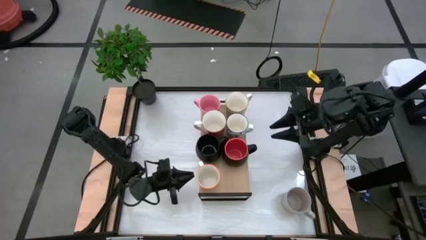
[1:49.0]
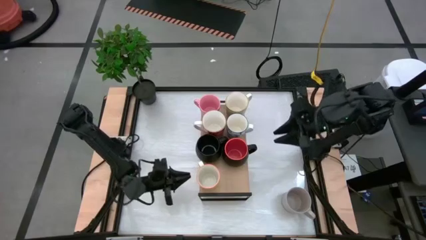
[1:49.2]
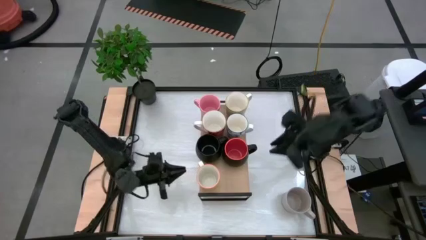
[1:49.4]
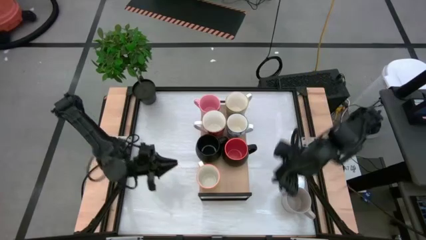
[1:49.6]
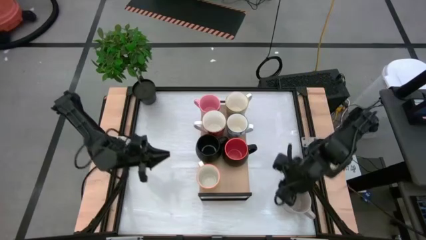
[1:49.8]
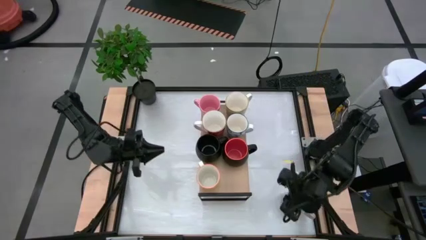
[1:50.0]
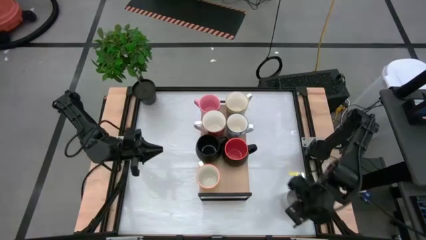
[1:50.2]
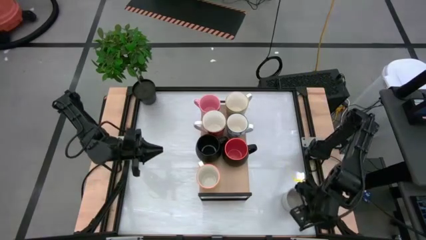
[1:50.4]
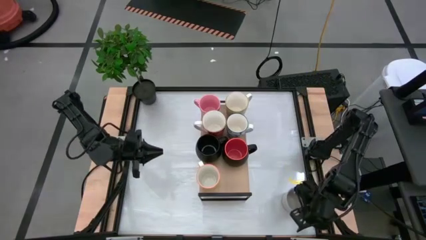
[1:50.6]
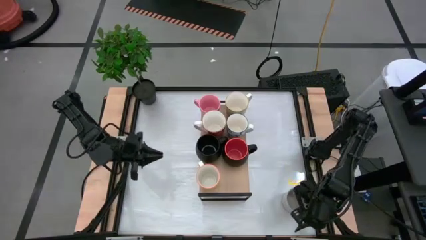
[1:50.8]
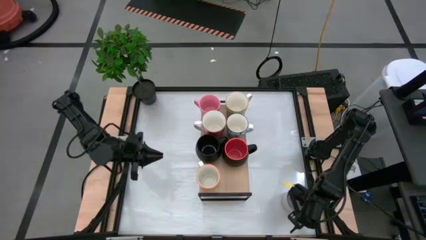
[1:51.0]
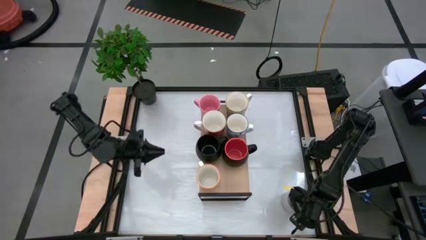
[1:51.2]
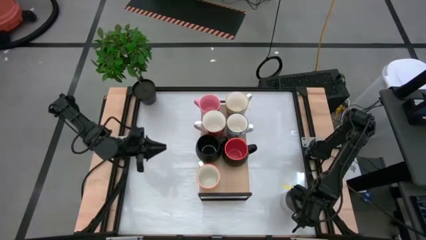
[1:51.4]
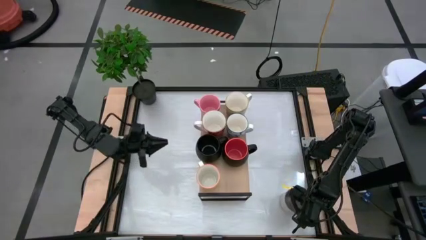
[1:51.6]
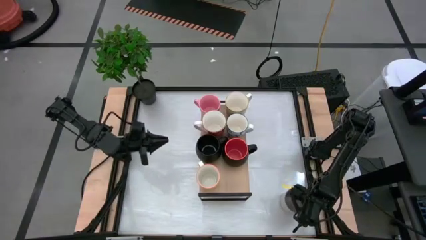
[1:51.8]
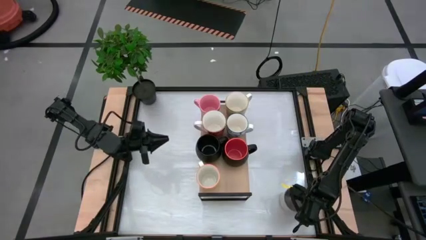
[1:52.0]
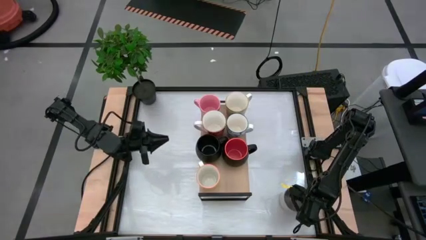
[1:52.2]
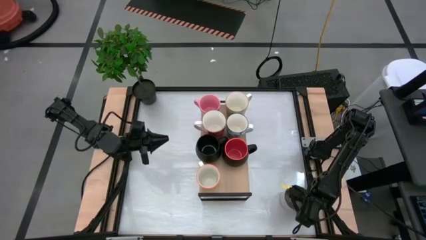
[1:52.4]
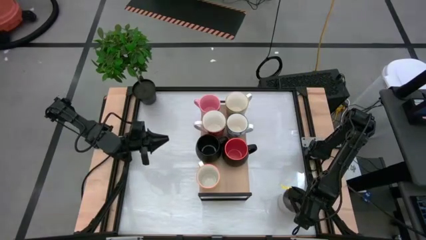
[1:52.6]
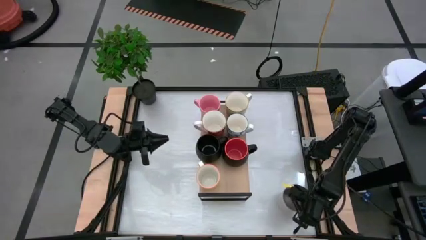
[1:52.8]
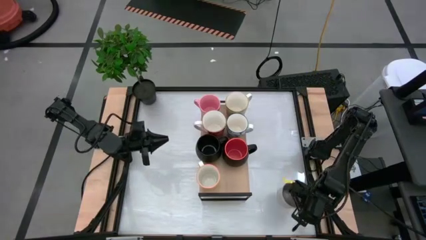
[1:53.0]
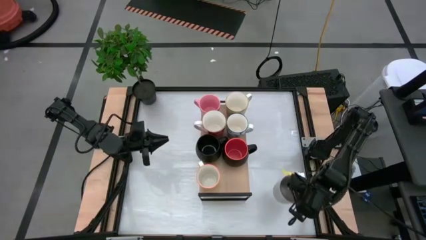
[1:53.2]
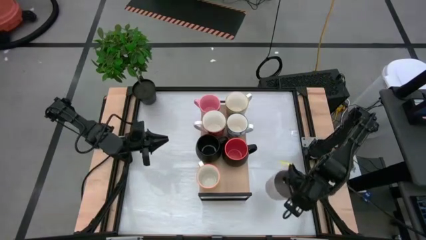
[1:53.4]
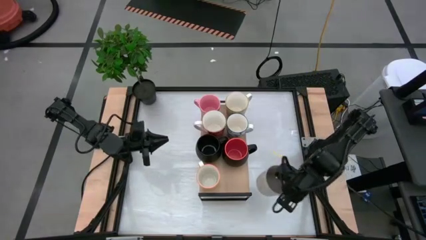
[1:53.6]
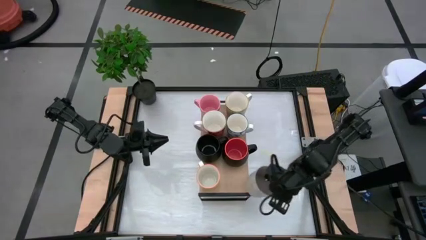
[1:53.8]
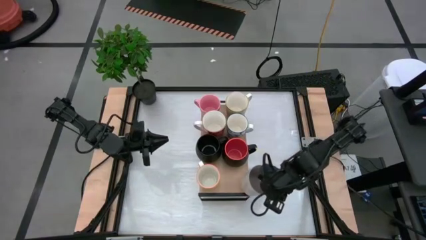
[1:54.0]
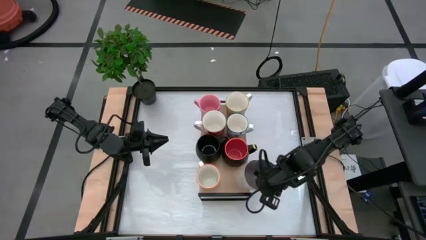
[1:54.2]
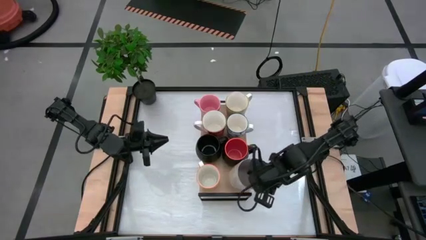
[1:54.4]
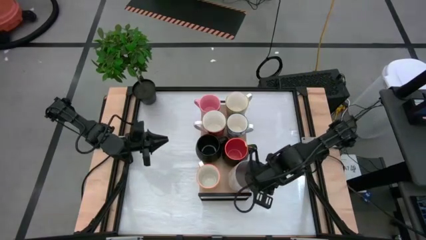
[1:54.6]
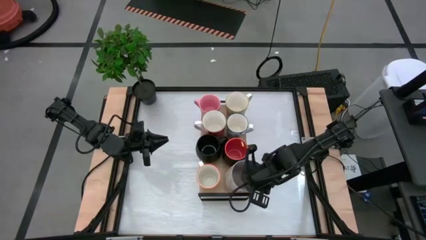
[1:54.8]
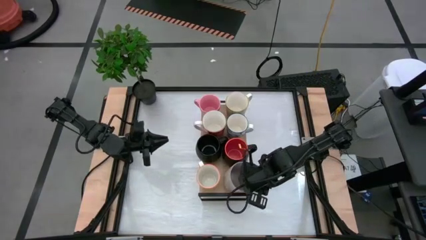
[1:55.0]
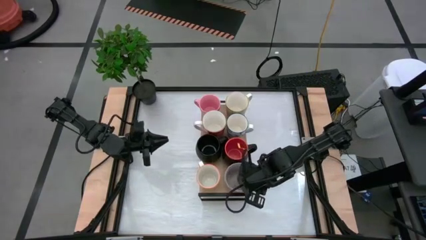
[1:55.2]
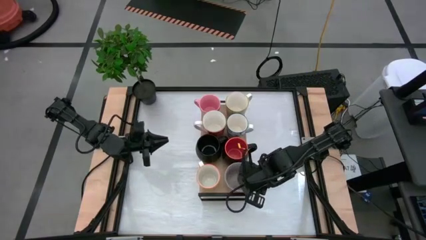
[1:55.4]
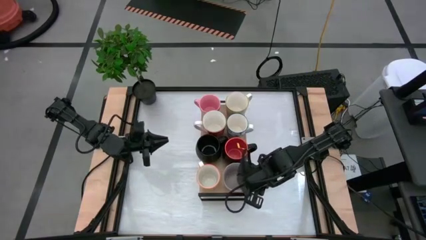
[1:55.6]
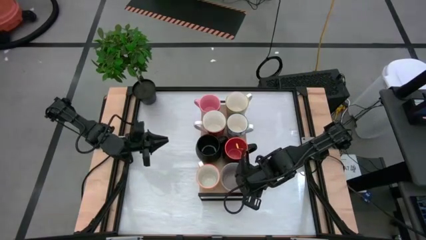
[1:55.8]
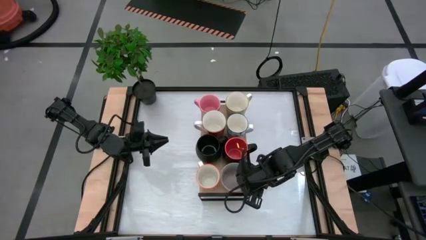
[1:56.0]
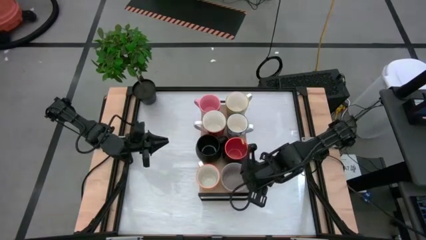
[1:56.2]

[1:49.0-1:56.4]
Task: Place coffee mugs
Put the gray mug on the shelf

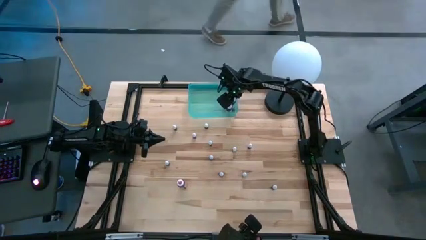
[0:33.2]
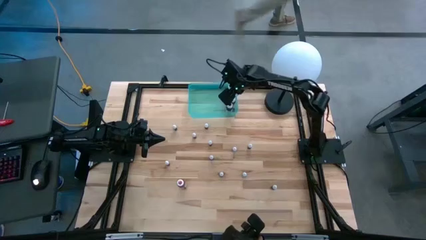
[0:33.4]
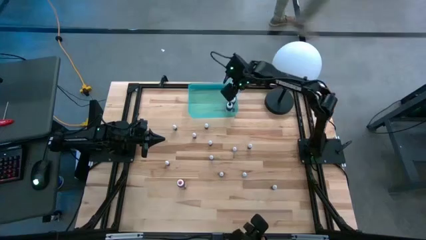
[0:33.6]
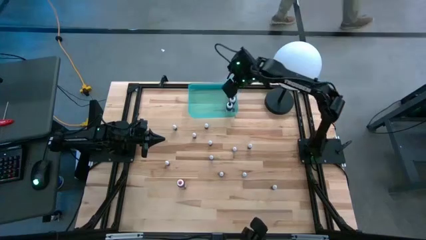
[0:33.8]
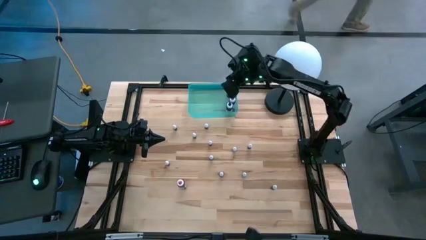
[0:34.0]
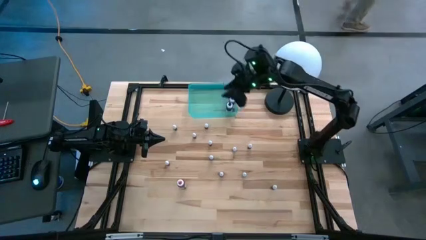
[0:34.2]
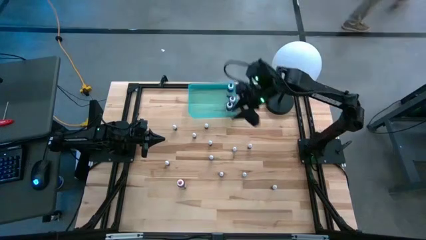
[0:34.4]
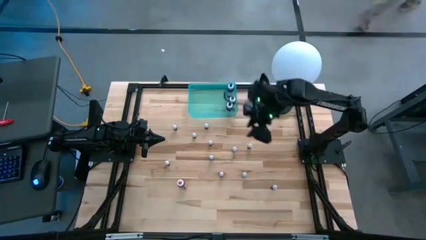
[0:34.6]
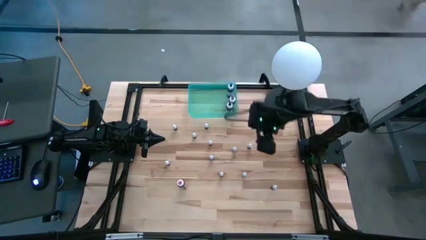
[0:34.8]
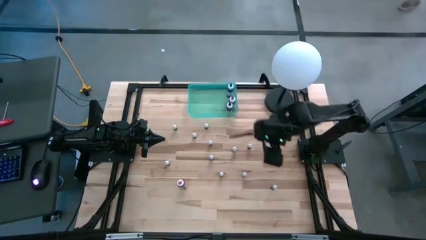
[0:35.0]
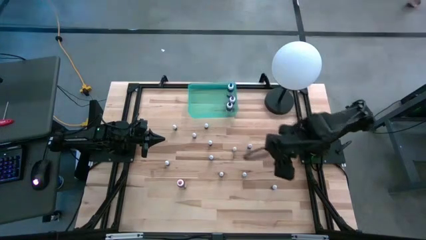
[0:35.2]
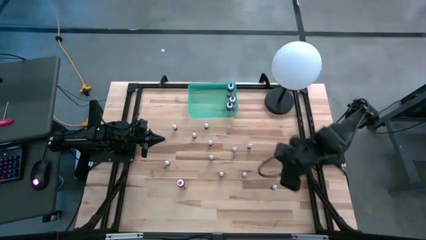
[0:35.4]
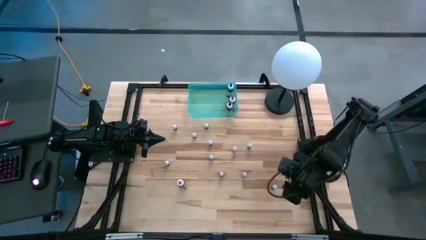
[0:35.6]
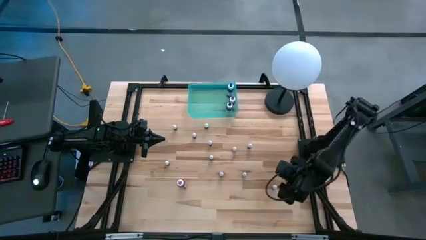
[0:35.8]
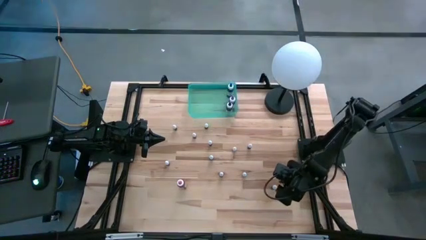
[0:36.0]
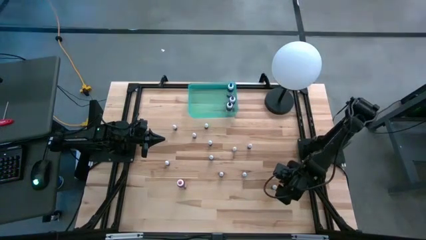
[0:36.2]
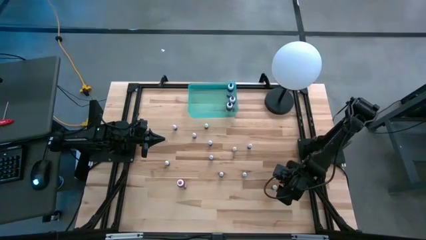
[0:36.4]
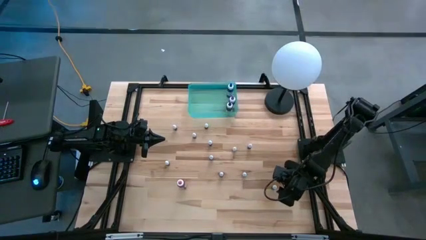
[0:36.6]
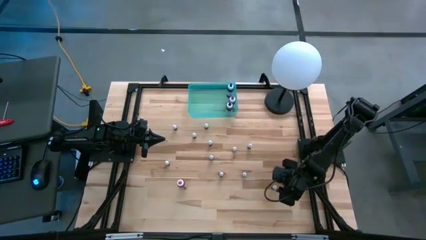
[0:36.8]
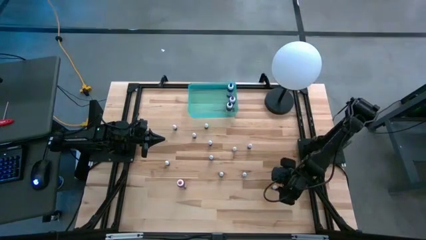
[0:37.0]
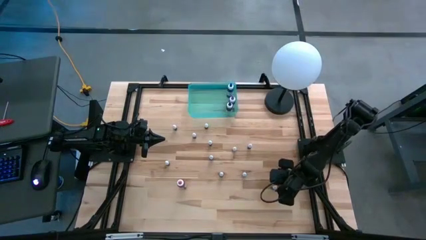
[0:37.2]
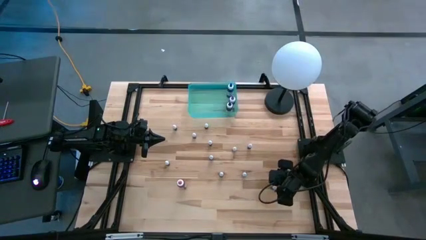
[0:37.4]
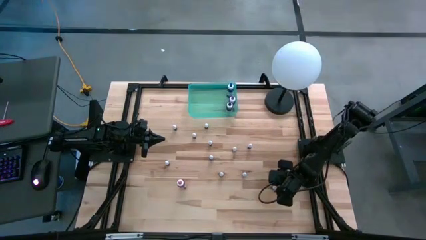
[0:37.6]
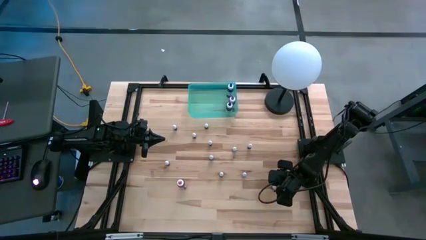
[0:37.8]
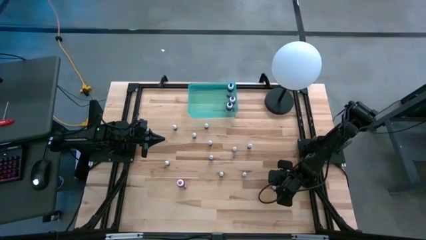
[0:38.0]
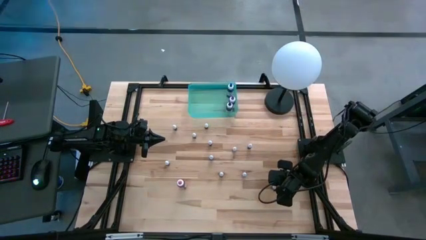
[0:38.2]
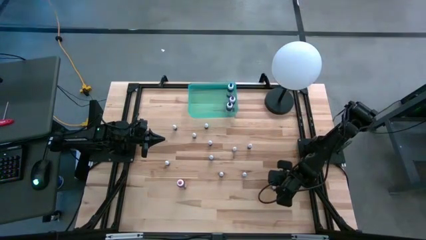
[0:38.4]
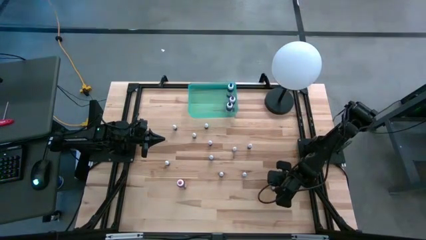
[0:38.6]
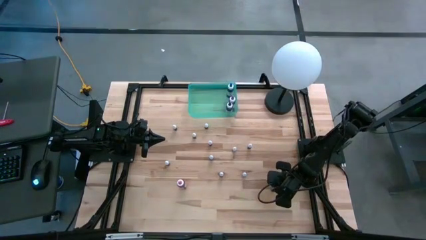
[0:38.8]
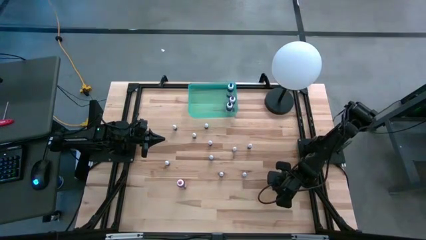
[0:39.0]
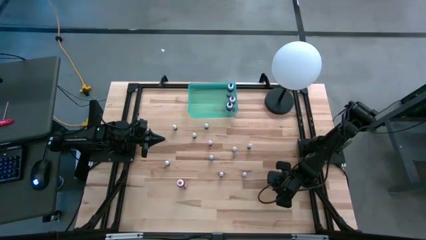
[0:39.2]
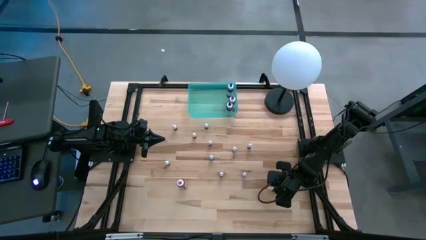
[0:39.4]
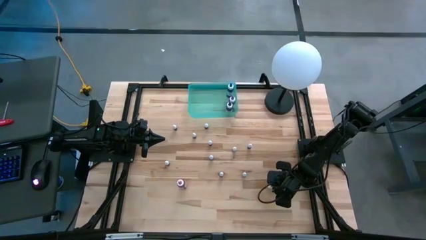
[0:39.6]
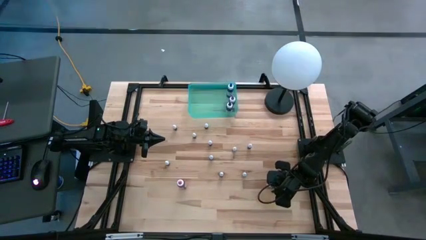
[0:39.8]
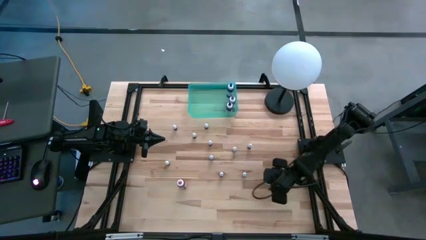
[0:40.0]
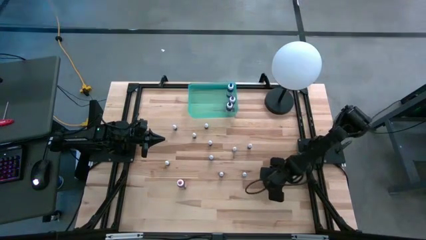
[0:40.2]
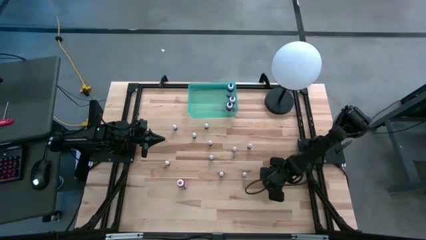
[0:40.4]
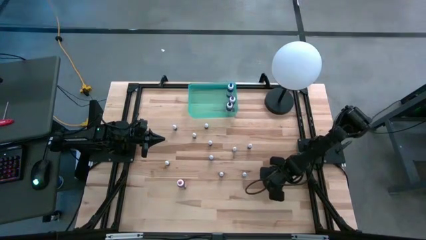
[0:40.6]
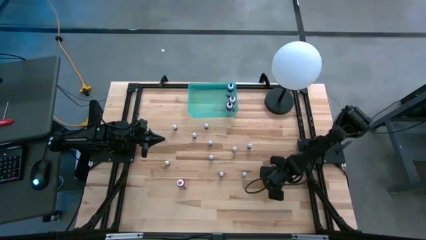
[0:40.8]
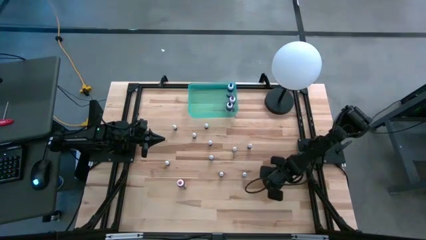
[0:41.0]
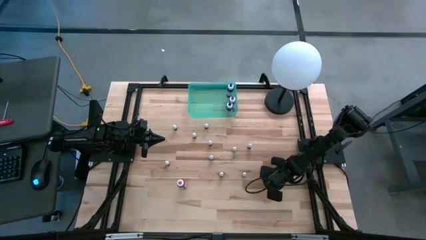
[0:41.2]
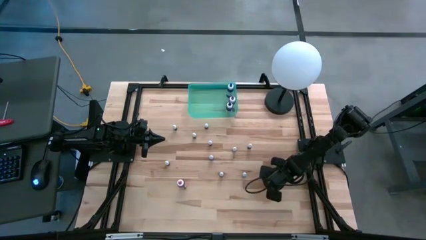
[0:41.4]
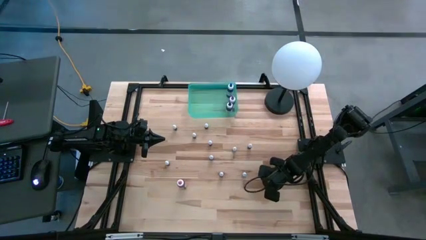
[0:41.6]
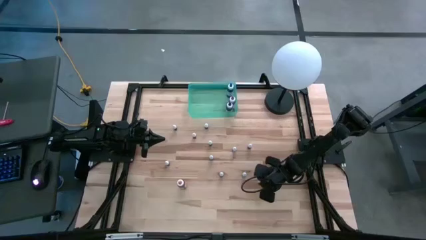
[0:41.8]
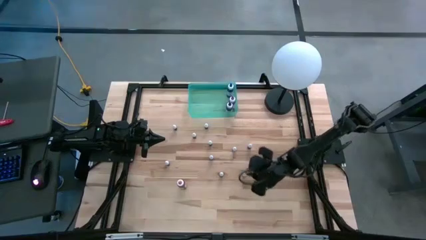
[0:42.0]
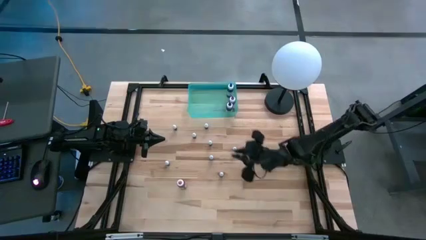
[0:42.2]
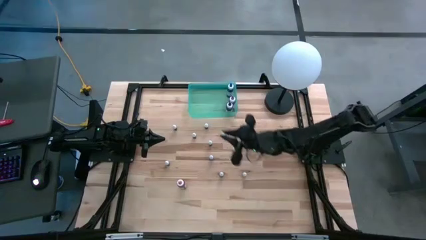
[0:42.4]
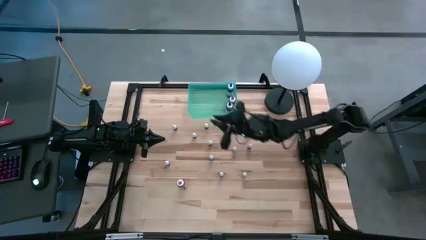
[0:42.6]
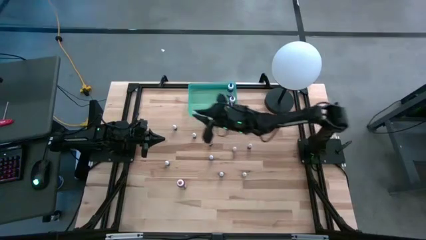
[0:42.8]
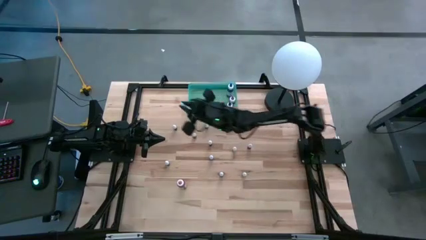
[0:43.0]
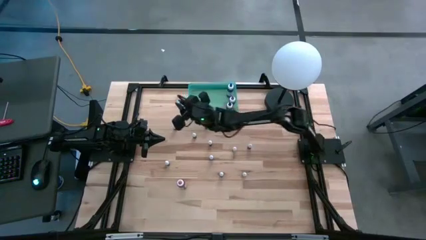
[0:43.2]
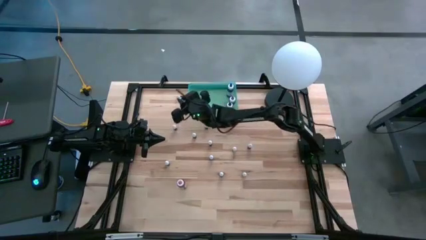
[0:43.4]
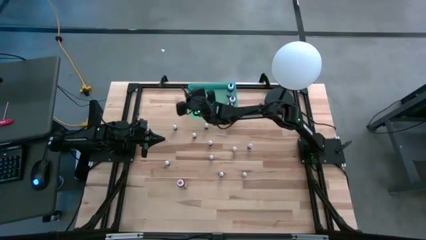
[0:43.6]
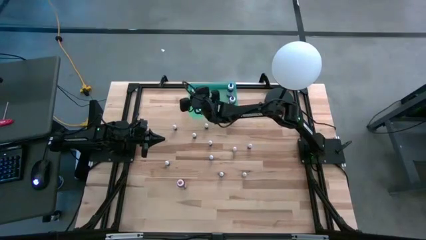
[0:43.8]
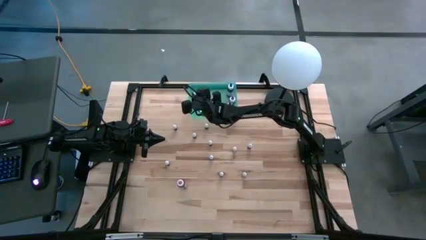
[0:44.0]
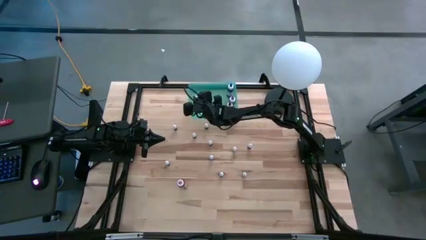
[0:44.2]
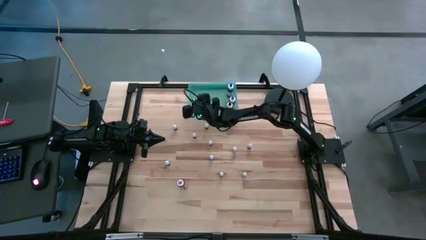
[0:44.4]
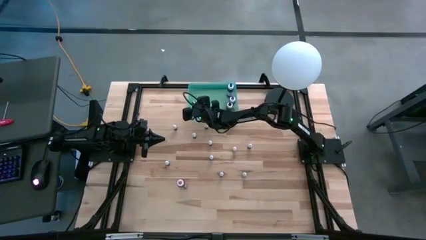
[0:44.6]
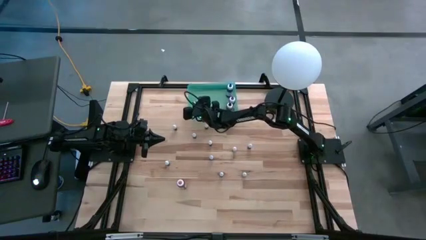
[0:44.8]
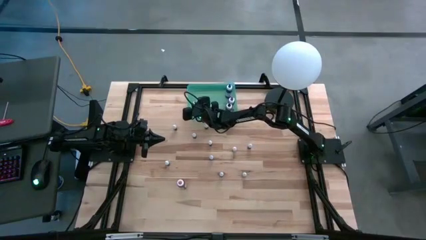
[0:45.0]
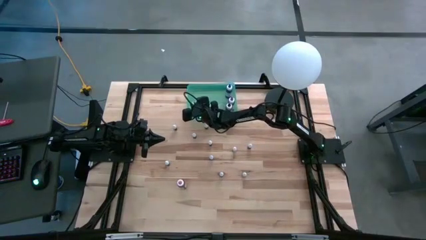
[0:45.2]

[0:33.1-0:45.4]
Task: Pick & Place food coloring
Put the small purple food coloring into the bin
